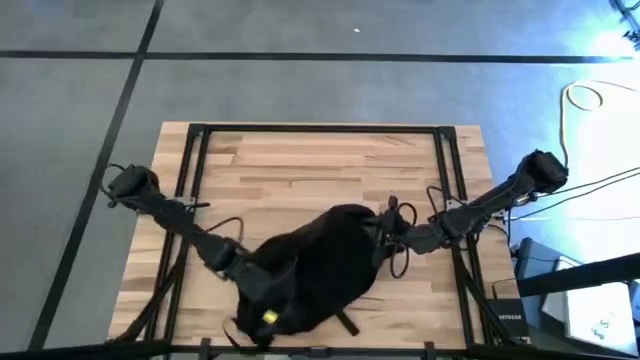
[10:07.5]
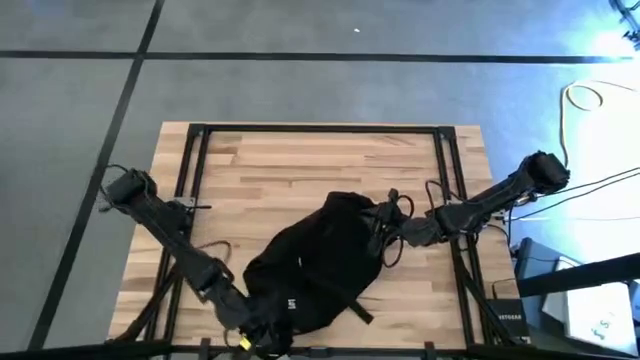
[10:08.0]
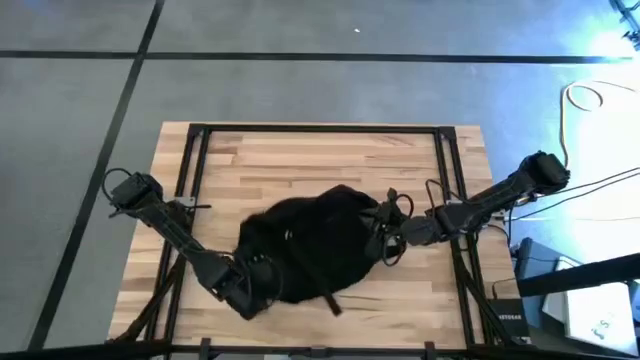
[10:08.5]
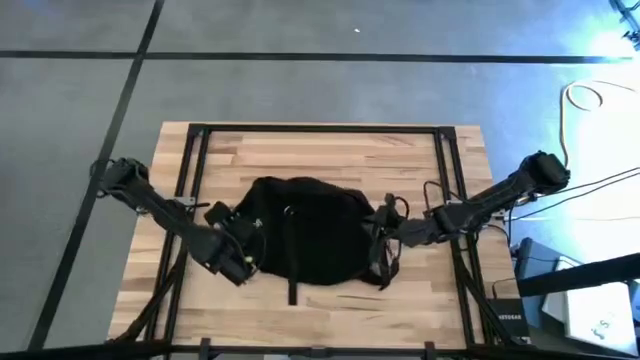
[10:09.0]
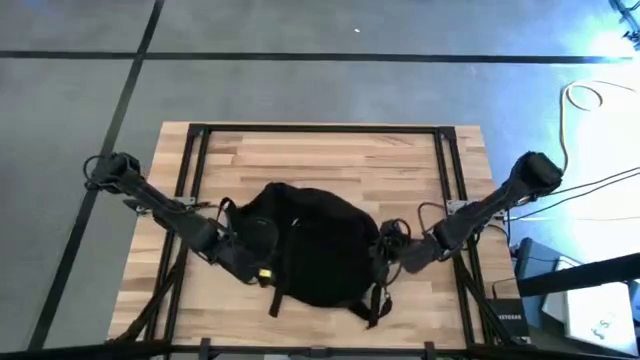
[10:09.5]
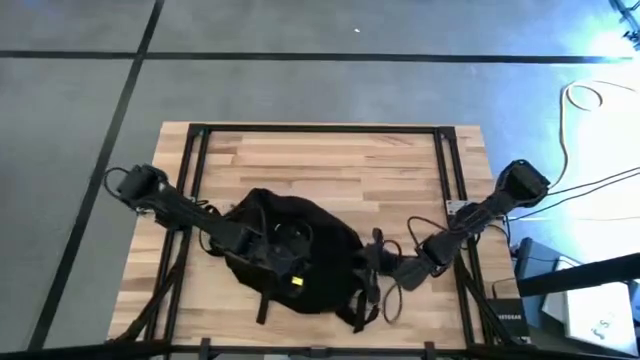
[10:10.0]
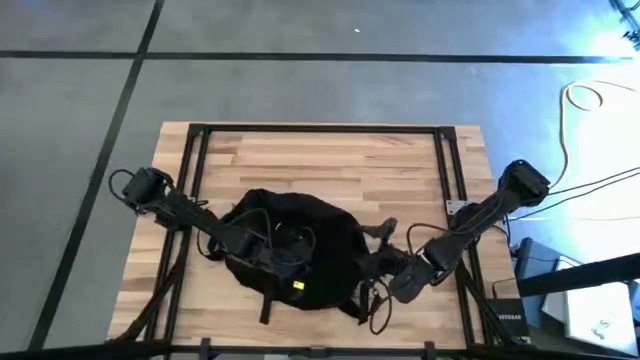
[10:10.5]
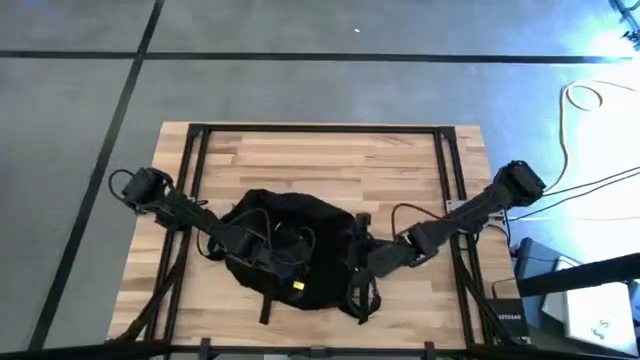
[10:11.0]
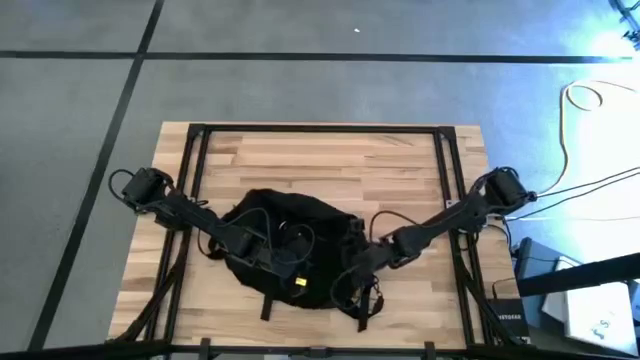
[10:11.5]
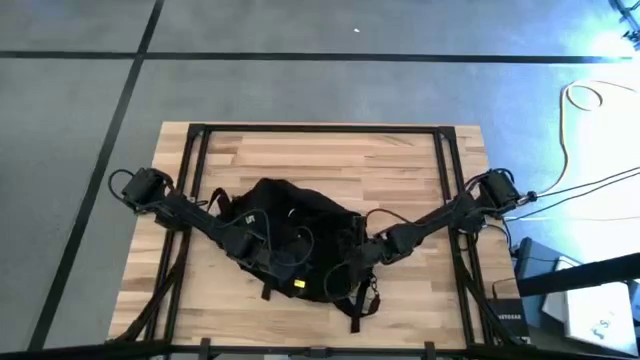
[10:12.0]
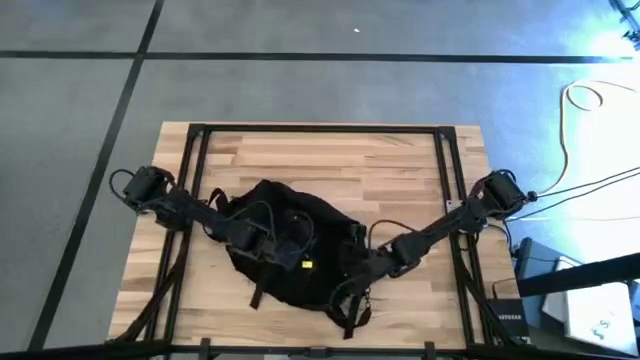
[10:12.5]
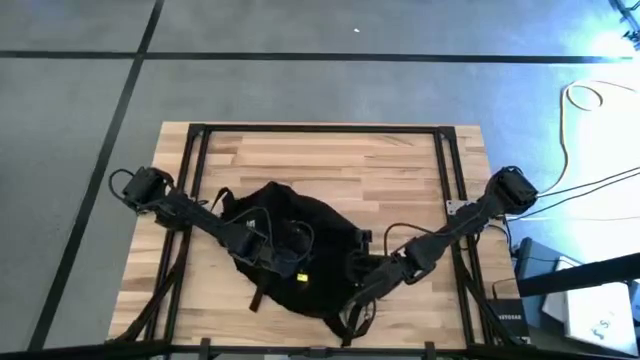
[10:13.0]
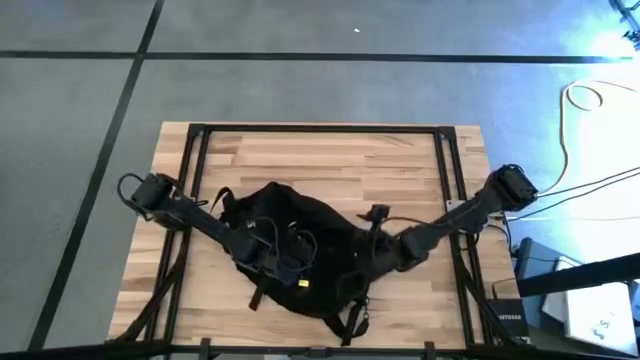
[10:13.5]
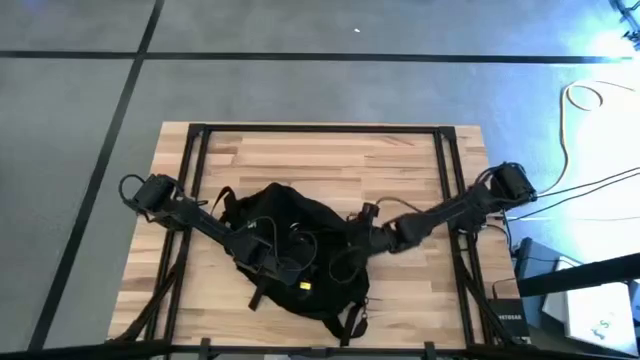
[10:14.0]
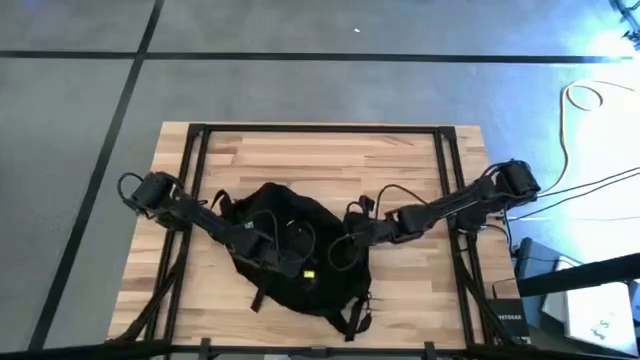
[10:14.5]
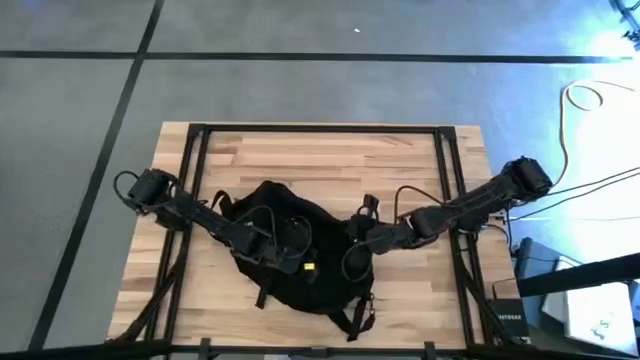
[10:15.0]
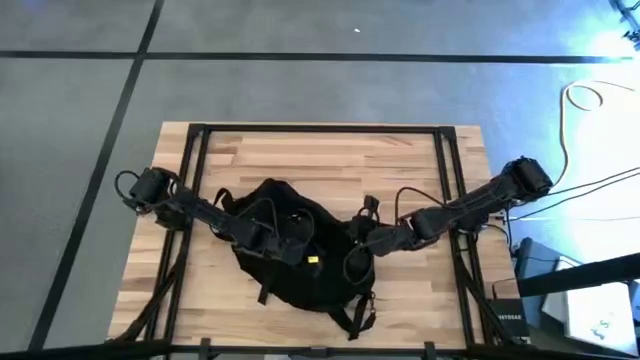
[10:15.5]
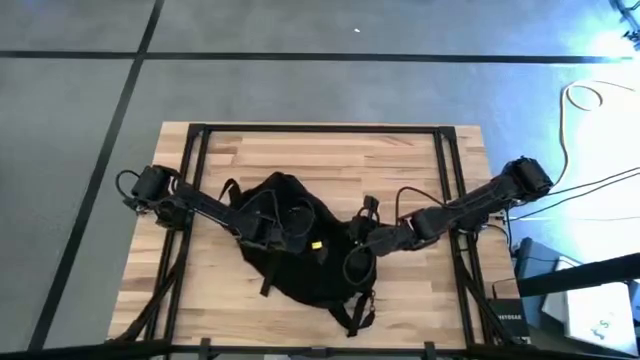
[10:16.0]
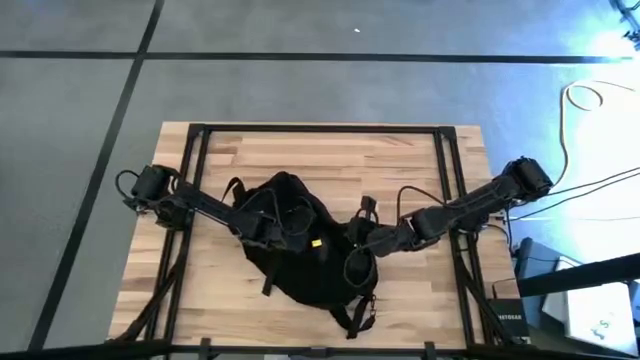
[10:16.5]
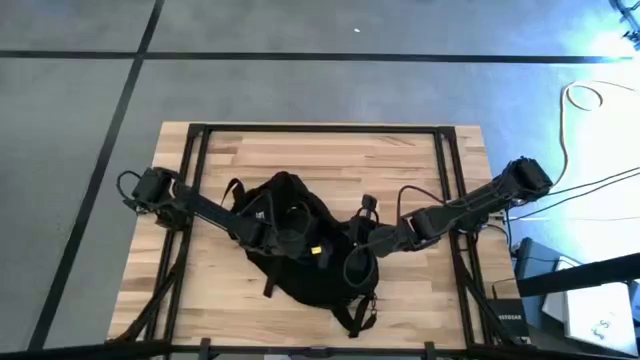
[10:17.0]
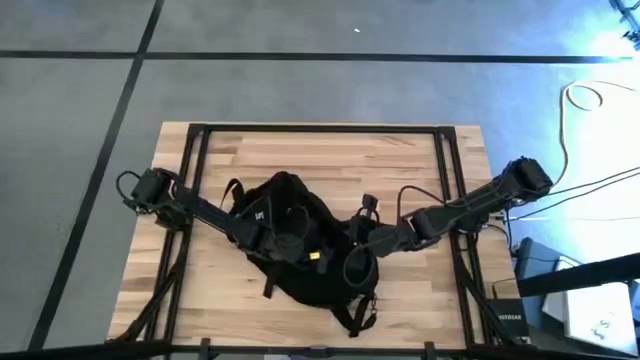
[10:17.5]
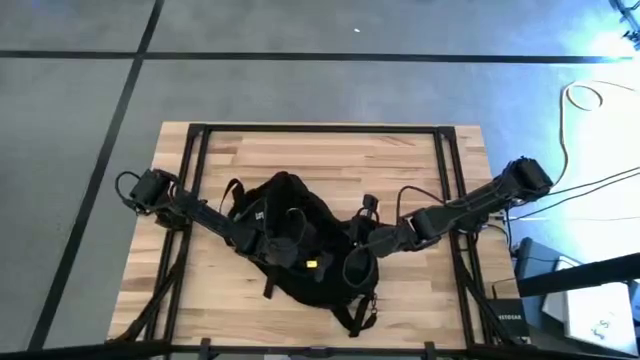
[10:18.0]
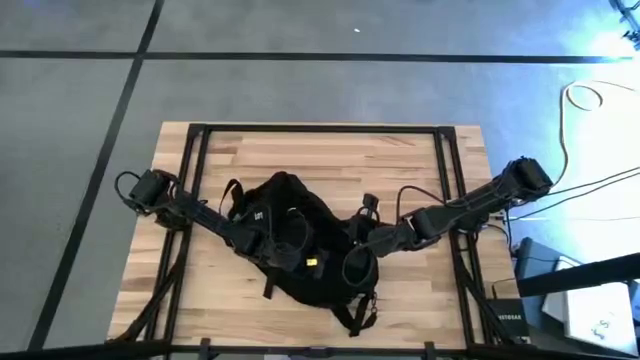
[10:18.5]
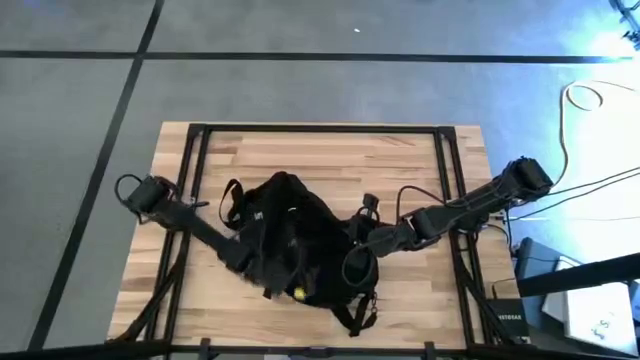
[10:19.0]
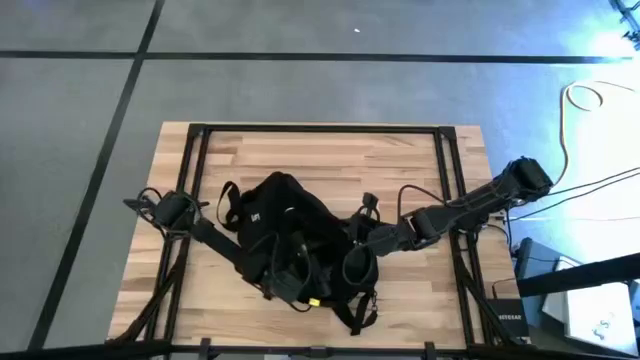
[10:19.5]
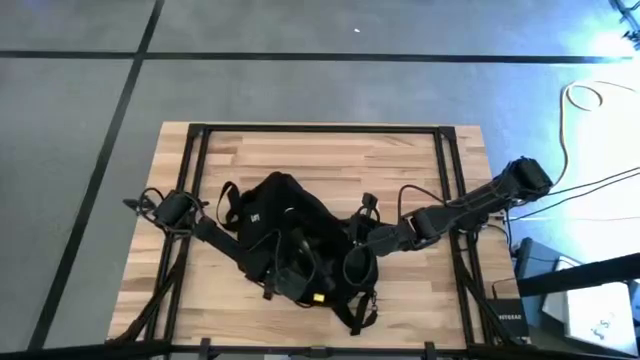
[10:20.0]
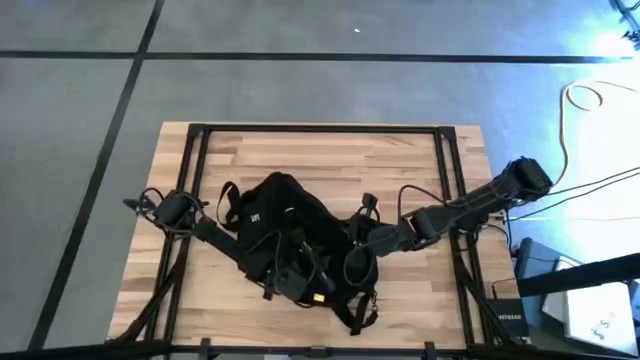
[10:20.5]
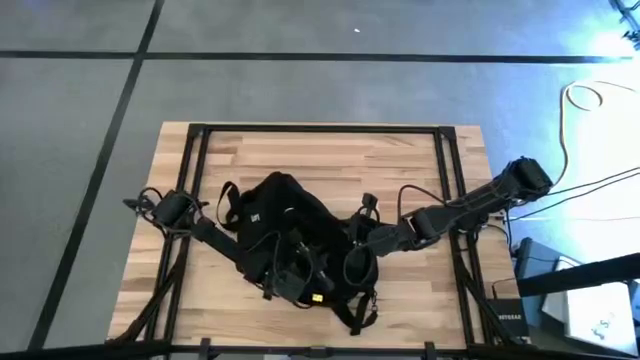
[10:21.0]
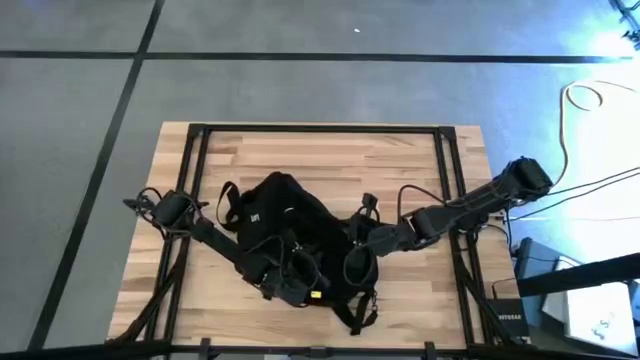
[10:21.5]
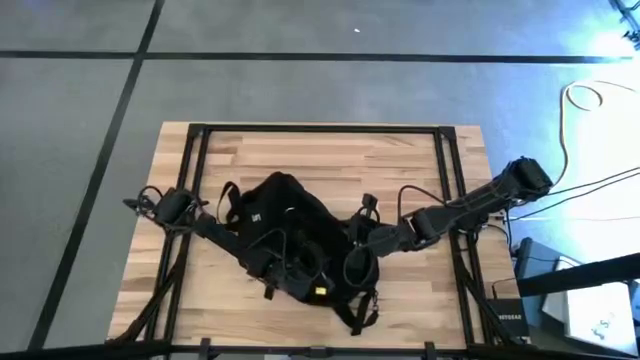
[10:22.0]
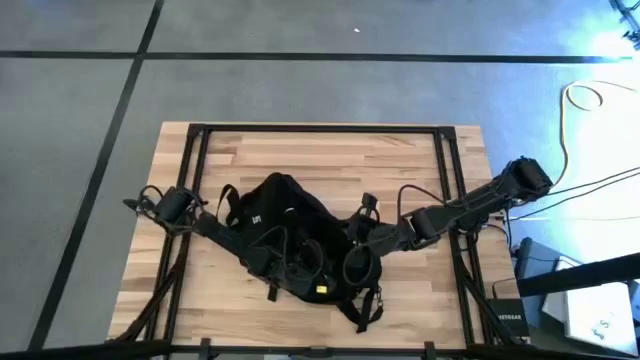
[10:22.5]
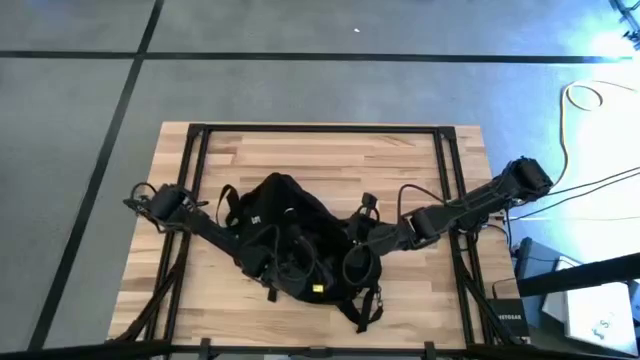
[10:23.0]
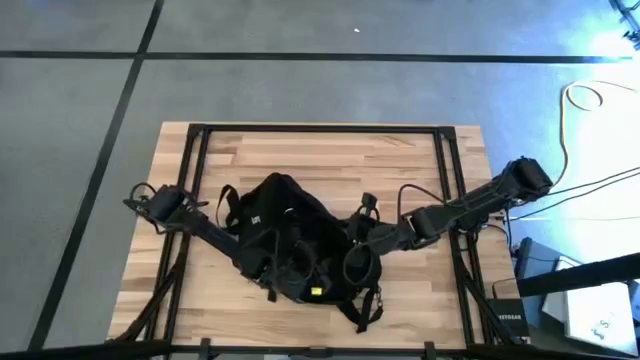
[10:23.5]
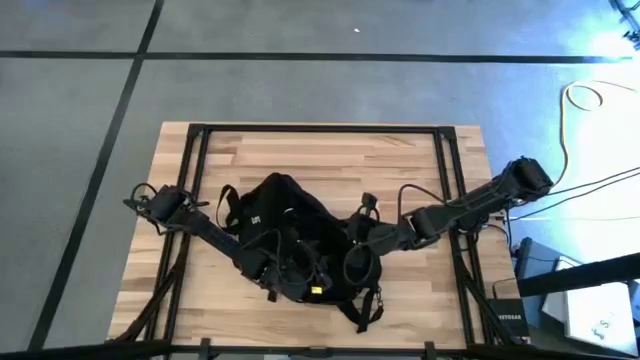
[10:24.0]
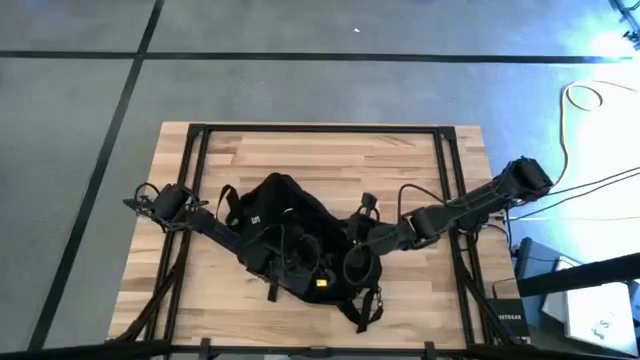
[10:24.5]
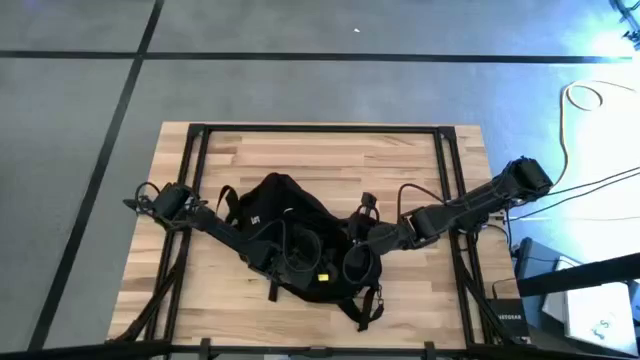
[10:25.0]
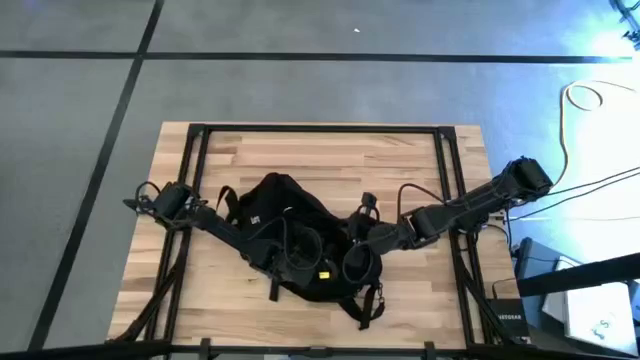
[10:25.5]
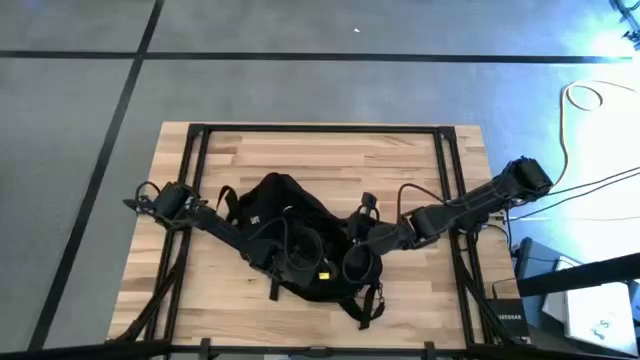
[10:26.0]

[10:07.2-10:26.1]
Task: Unpack backpack
Close the black backpack

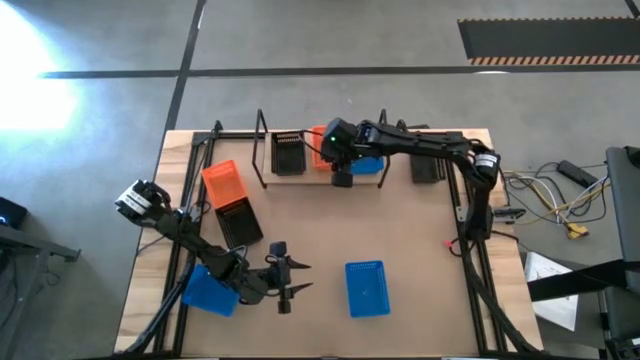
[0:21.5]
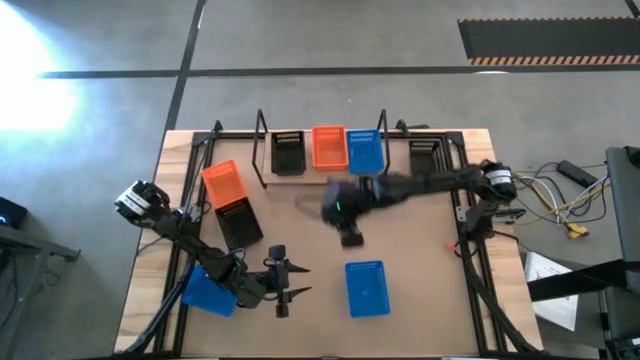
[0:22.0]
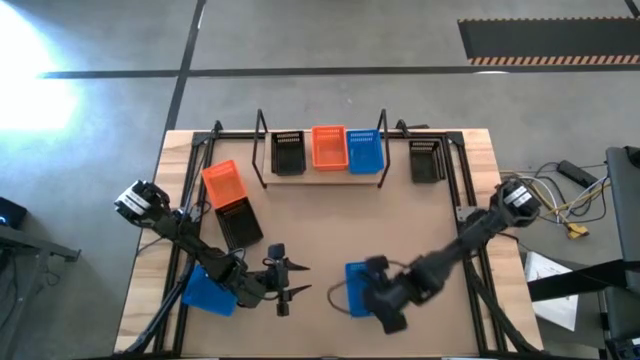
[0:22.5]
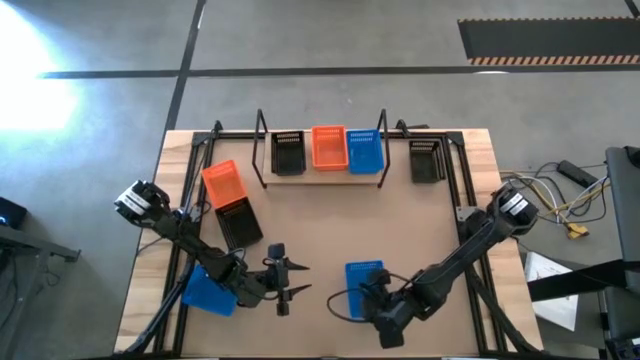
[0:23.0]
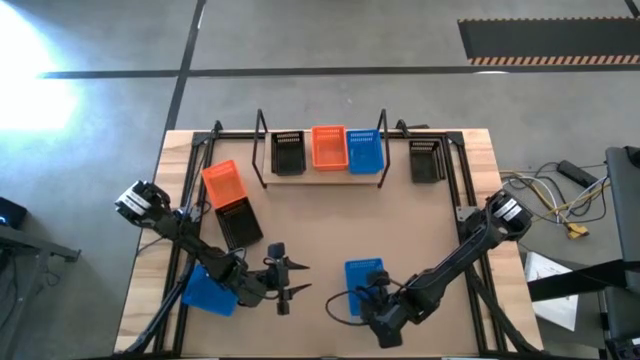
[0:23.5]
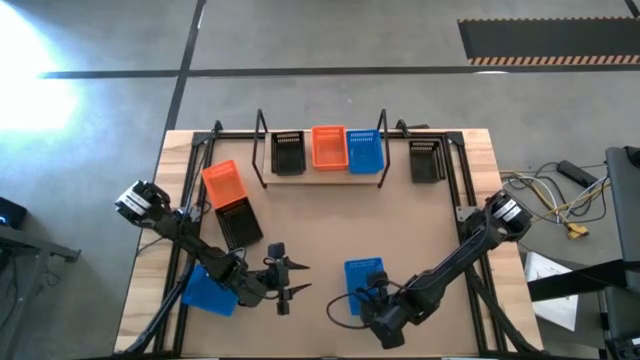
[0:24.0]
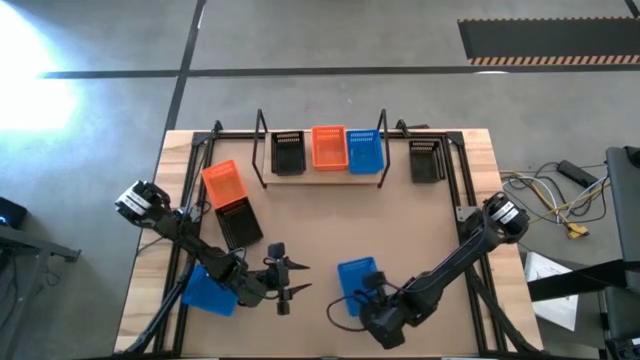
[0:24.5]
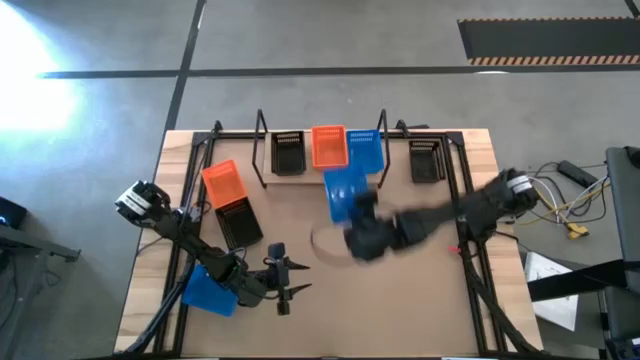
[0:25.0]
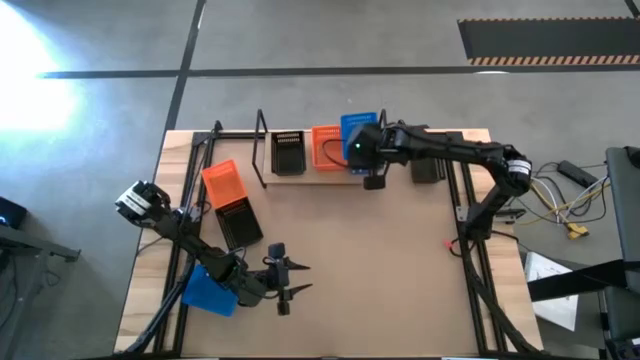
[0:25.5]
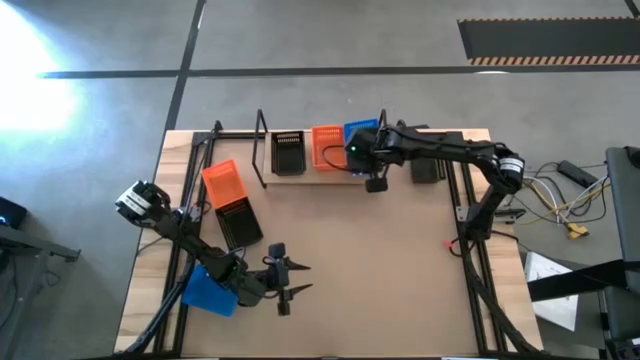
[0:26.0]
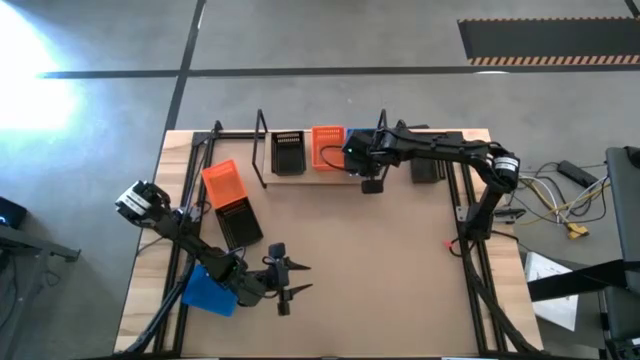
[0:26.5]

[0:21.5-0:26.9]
Task: Stack baskets on shelf by color
Stack the right blue bin on the blue bin on the shelf
